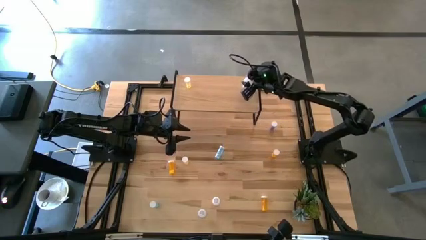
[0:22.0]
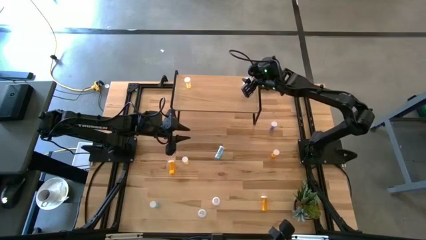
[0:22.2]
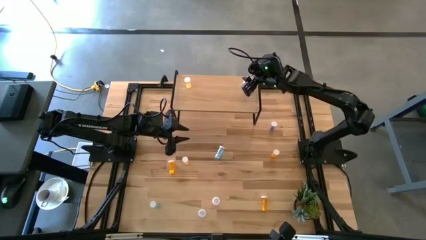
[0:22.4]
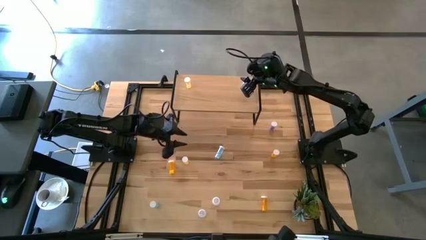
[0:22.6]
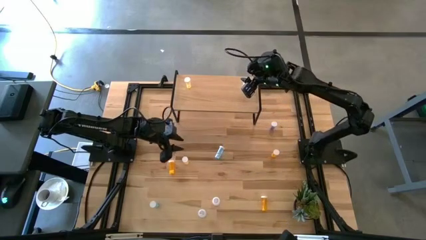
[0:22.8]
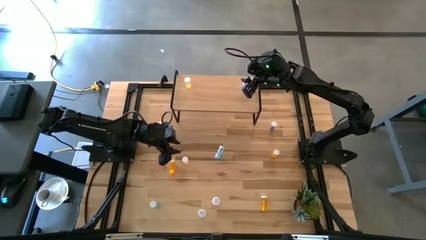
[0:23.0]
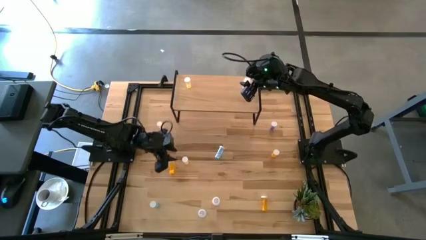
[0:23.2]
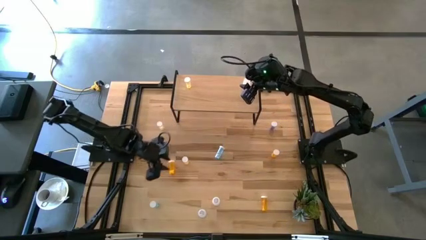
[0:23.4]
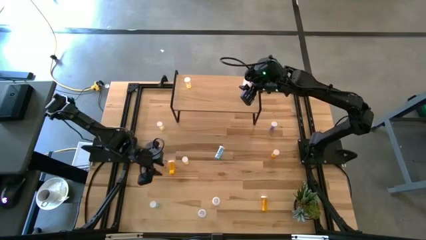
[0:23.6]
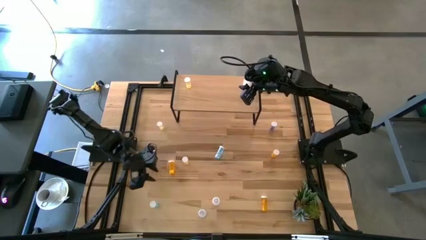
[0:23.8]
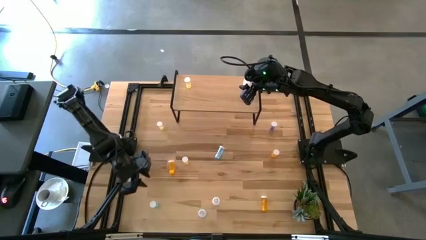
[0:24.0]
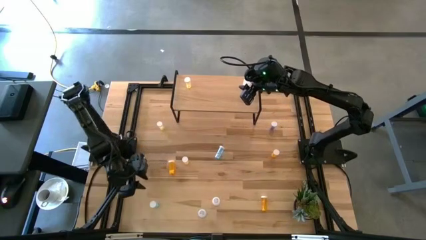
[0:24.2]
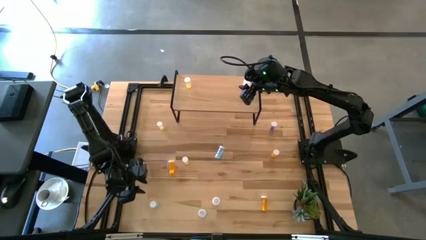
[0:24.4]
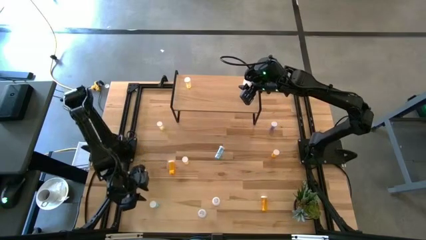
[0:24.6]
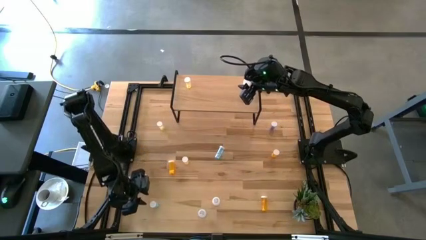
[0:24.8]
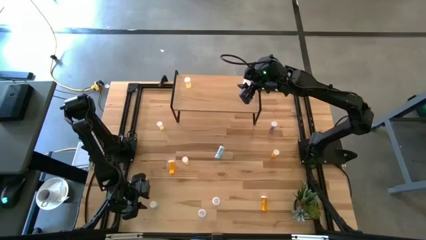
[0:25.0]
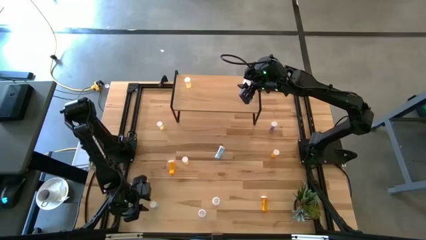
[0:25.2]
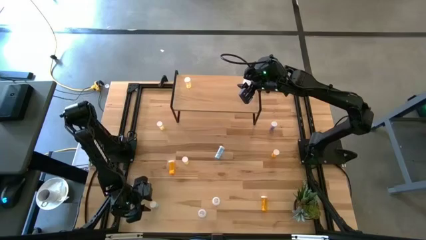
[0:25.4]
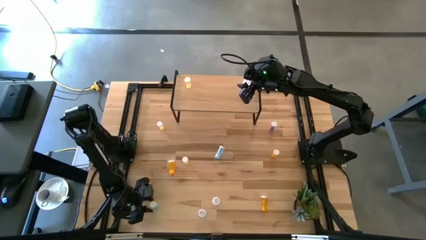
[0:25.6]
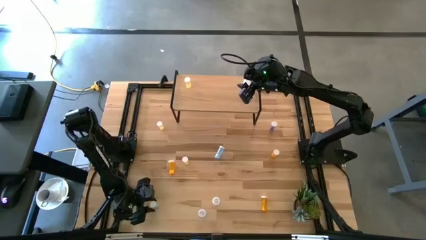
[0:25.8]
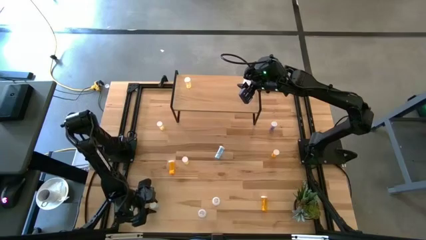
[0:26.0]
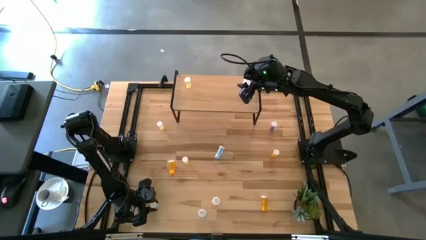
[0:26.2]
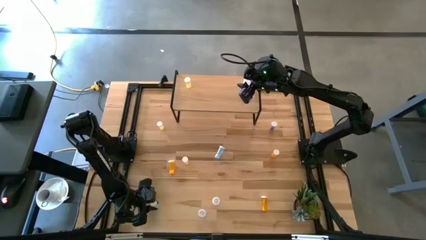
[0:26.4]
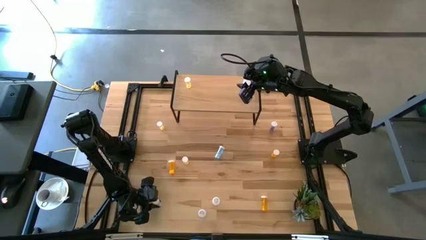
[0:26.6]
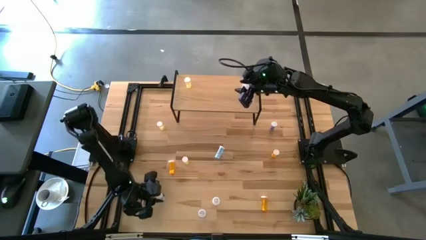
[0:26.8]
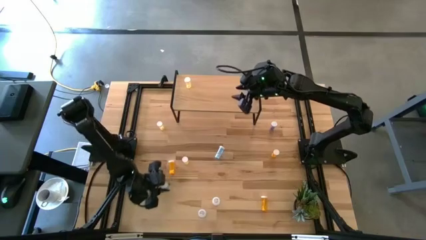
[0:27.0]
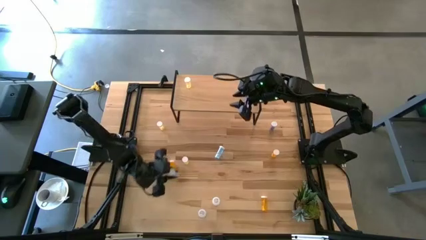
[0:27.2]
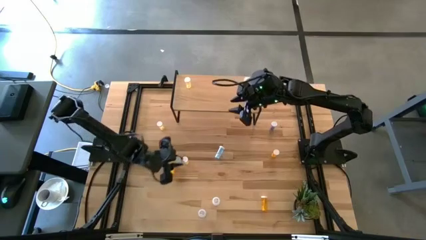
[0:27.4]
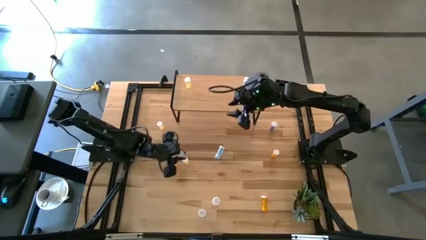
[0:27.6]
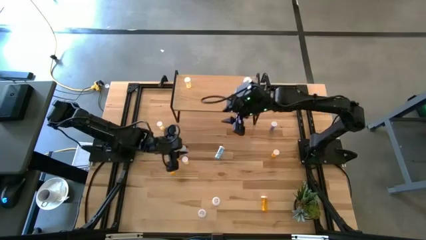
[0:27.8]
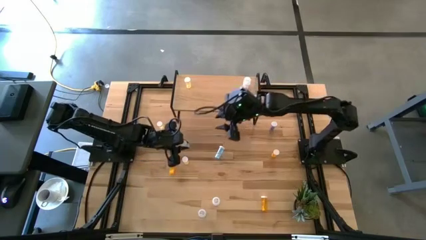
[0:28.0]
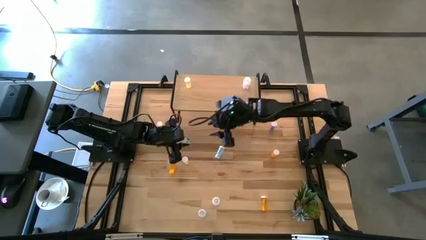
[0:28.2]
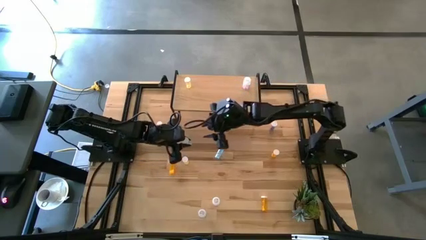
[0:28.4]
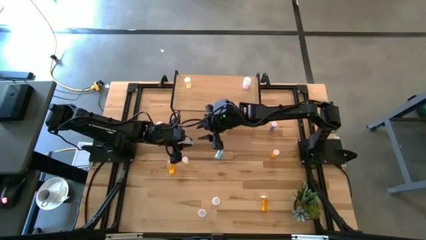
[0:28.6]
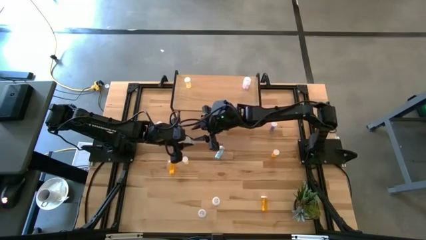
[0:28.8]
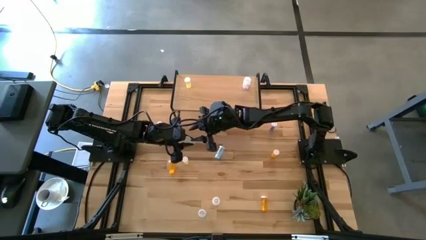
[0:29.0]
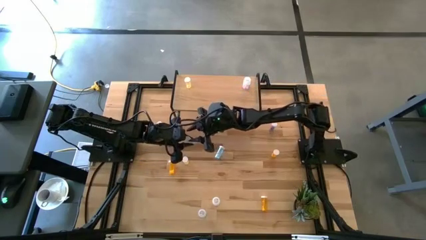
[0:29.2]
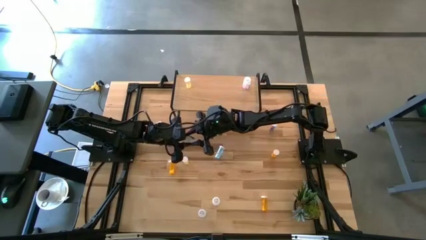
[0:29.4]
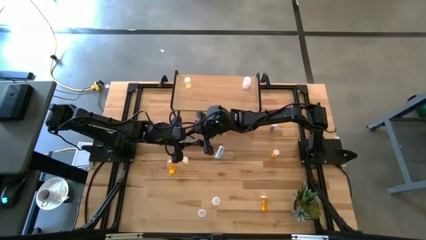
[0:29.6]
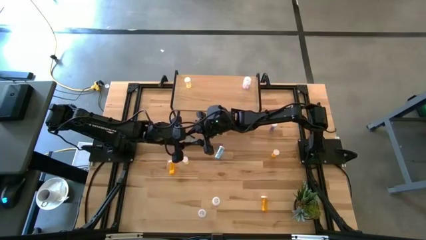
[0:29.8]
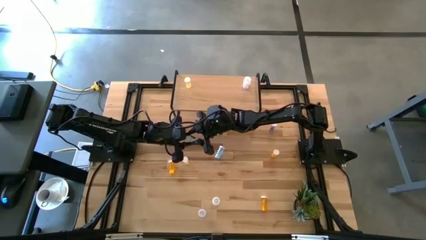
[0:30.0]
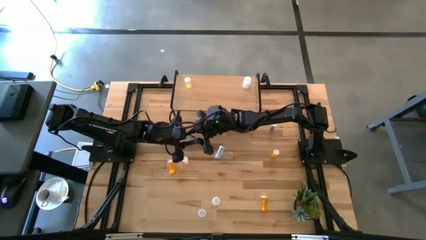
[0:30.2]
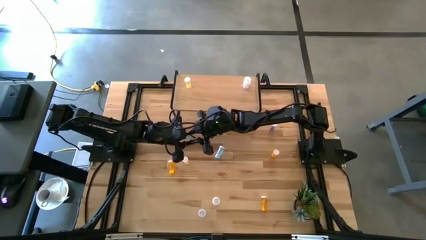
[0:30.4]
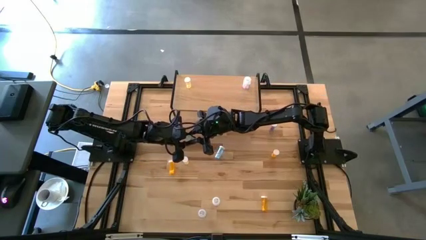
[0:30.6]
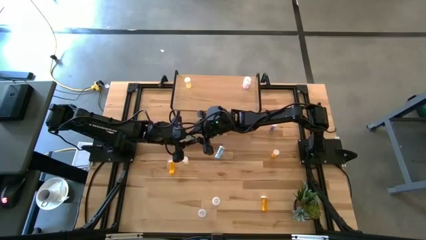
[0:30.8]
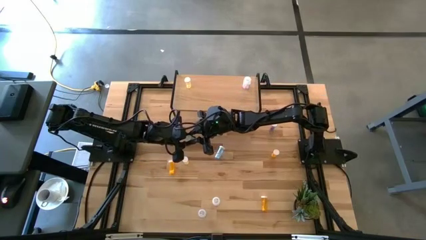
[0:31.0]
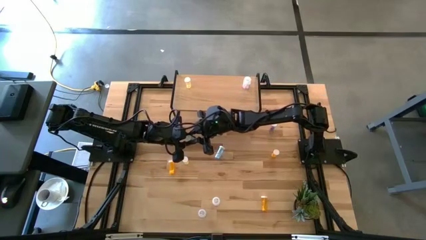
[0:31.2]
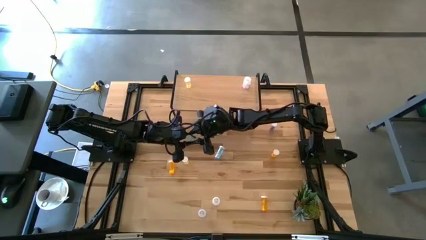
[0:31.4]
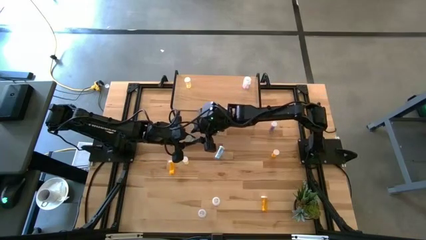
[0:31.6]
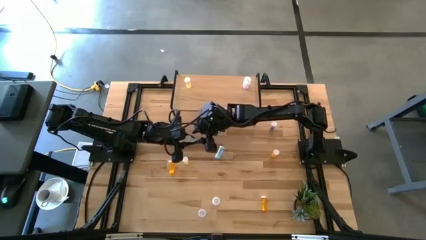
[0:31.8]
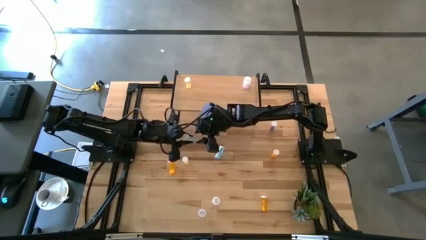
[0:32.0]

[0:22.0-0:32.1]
Task: Pick and place medicine bottles onto shelf by color
Put the bottom blue pill bottle on the shelf

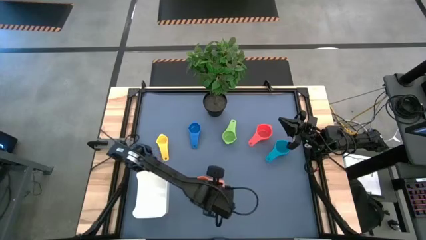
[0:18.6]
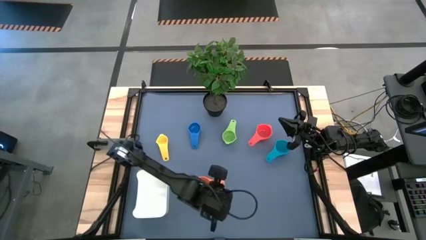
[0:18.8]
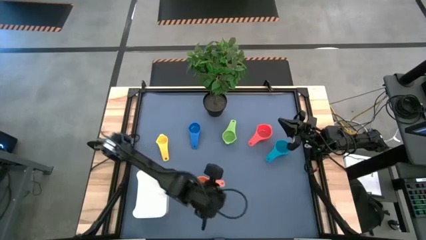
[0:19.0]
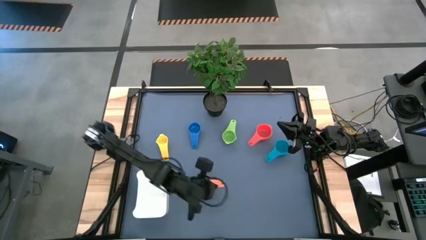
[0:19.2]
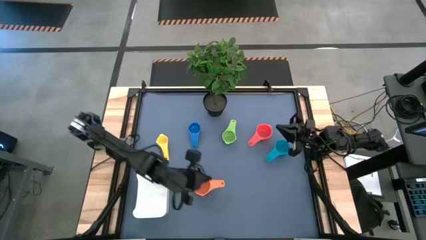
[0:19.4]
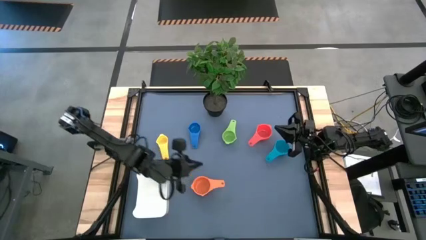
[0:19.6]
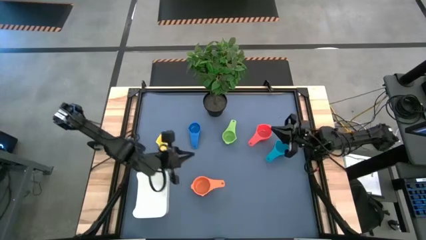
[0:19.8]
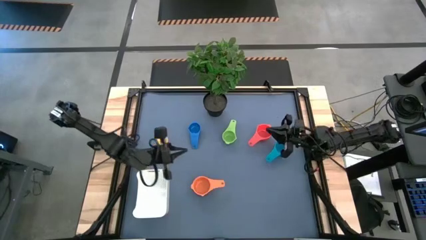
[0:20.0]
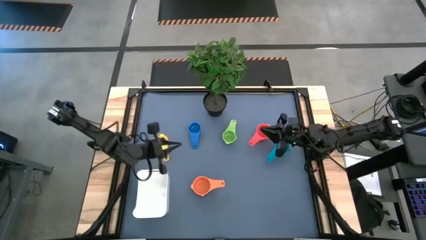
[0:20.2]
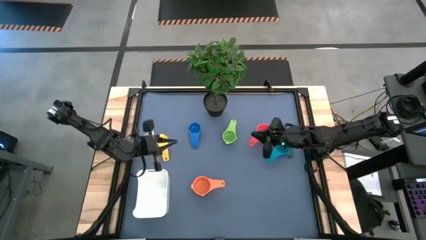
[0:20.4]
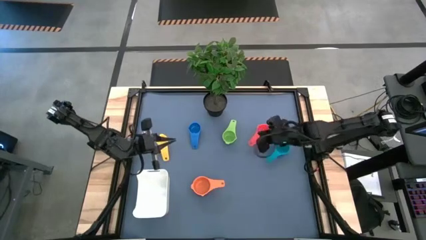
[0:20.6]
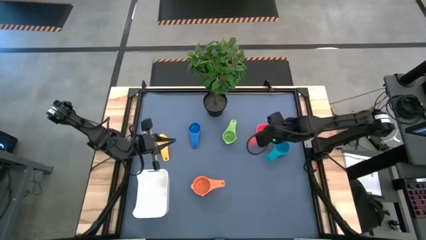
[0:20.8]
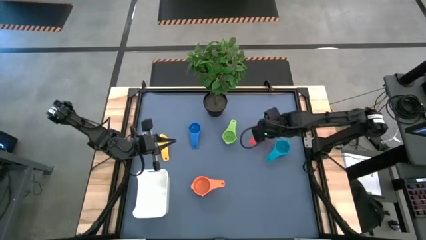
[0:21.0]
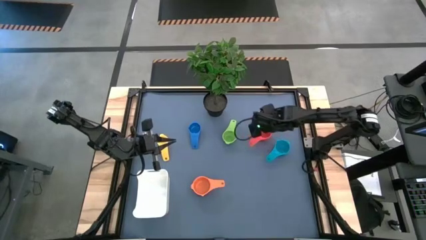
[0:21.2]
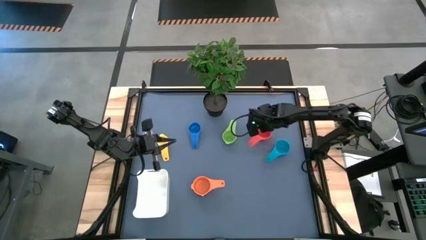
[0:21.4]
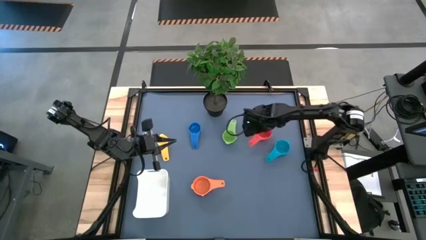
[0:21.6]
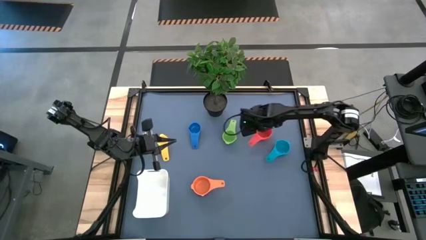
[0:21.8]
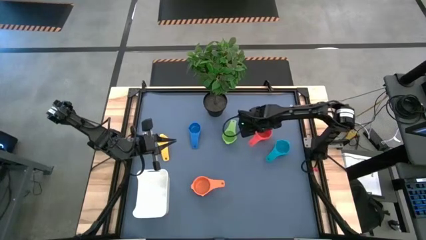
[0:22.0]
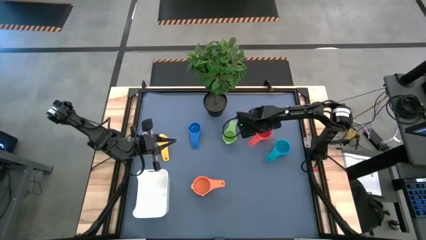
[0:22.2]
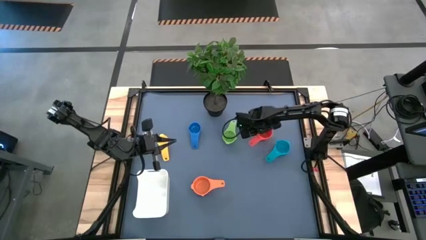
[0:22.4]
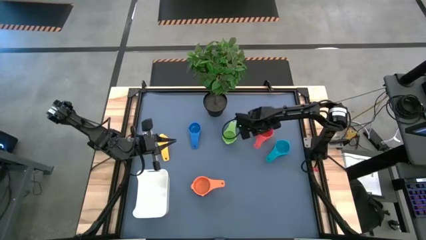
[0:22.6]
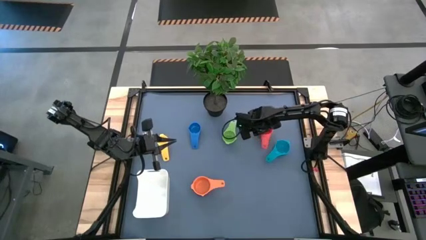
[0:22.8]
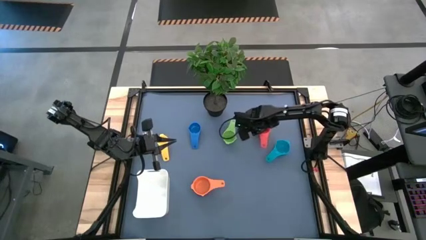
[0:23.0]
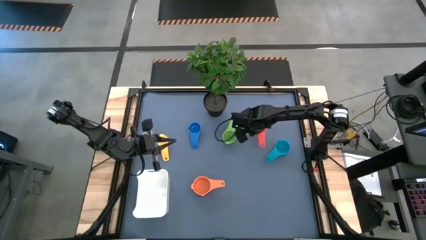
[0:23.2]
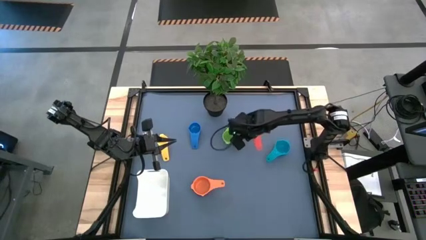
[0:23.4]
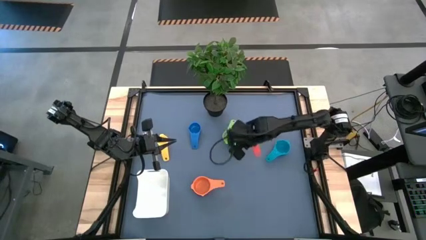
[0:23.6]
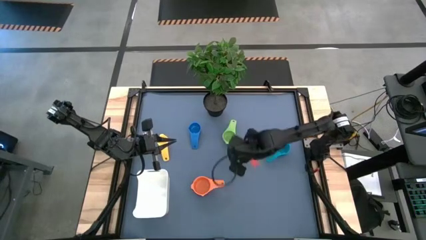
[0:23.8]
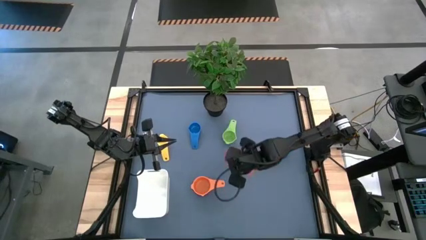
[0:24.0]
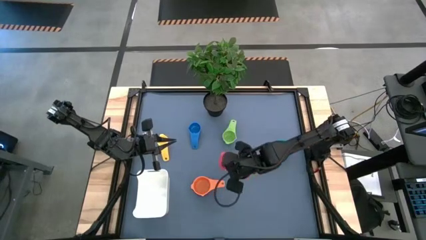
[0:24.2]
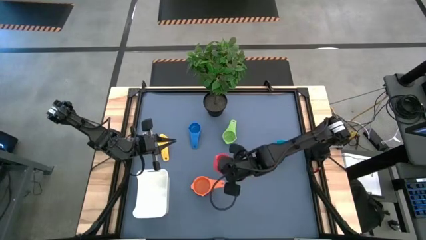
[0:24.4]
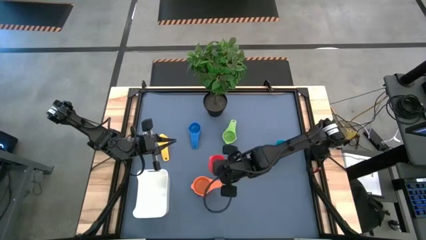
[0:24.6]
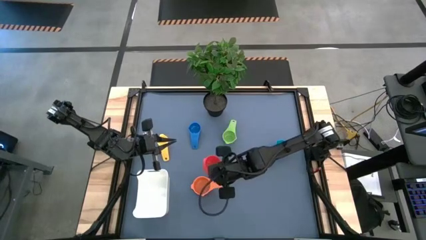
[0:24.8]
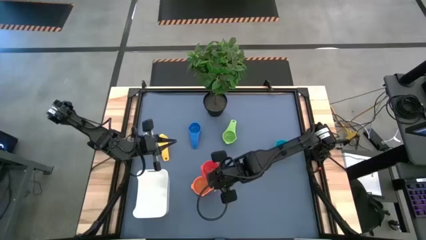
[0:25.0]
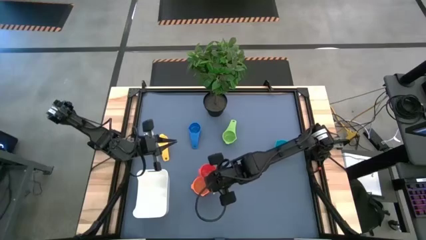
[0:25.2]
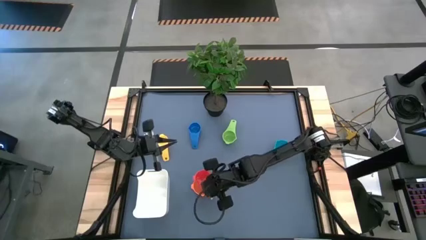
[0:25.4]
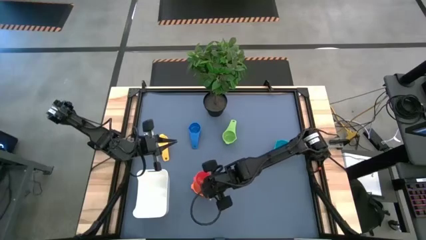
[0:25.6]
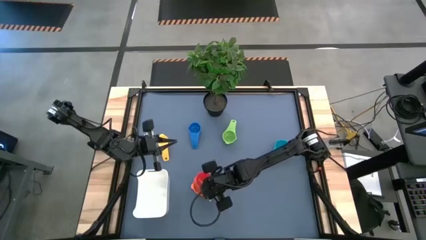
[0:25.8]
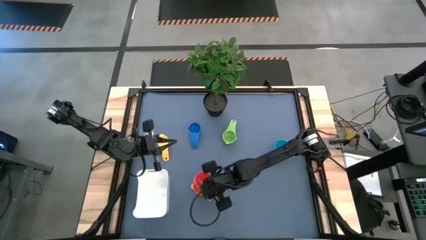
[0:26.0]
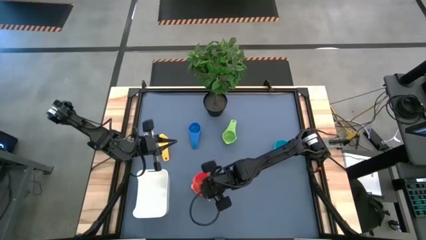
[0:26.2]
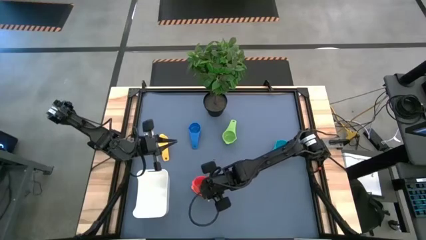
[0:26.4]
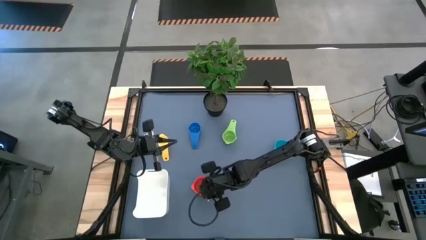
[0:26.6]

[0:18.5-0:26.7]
Task: Nest measuring cups in basket
Stack the red measuring cup on the orange measuring cup
